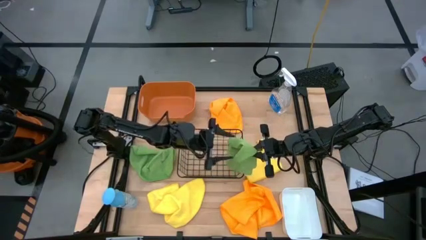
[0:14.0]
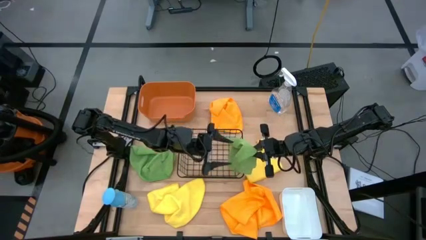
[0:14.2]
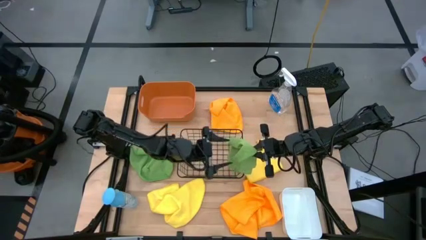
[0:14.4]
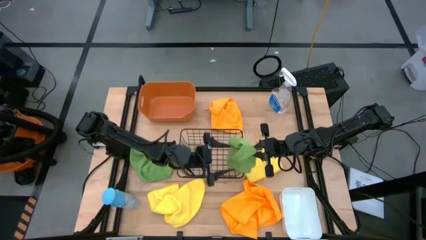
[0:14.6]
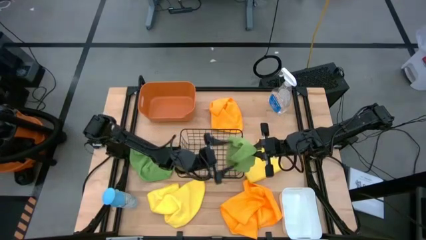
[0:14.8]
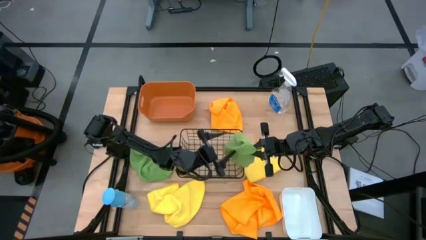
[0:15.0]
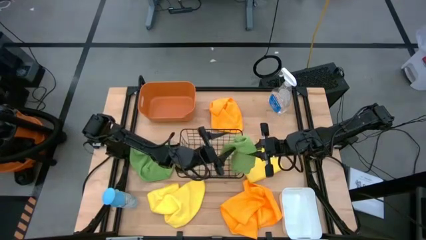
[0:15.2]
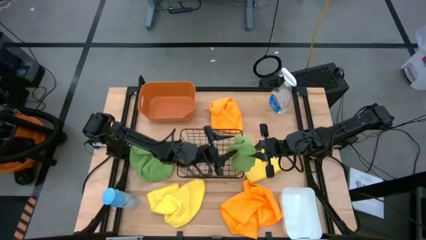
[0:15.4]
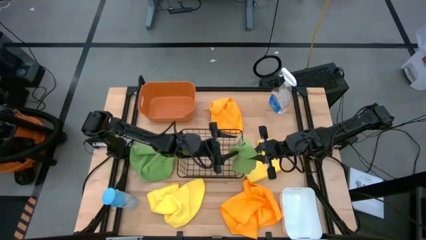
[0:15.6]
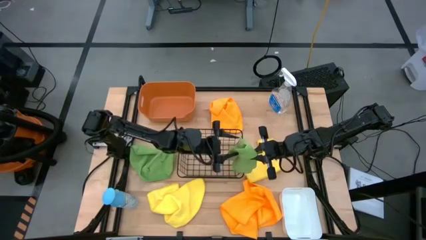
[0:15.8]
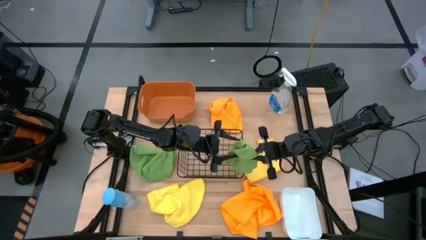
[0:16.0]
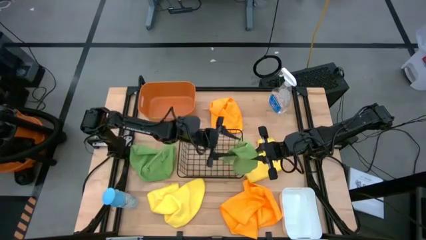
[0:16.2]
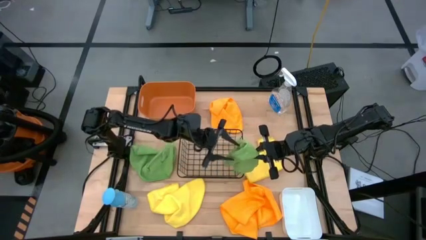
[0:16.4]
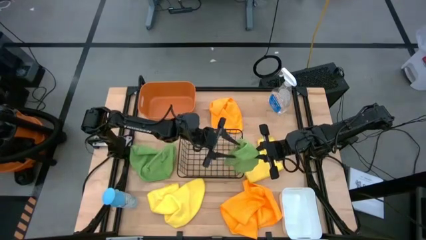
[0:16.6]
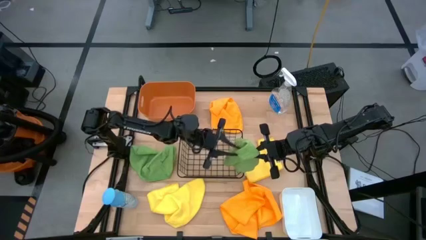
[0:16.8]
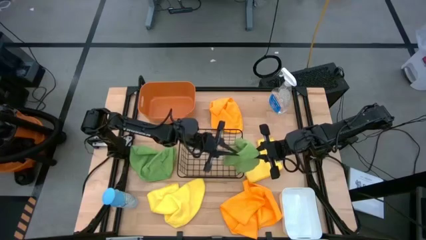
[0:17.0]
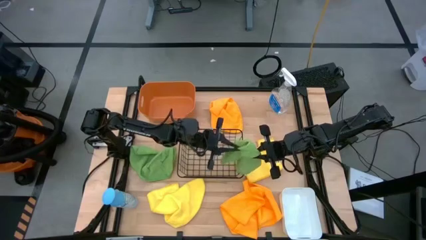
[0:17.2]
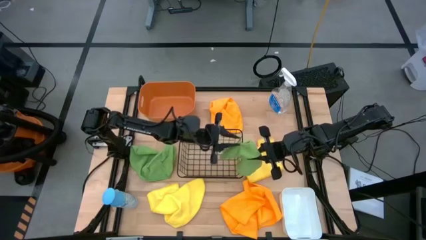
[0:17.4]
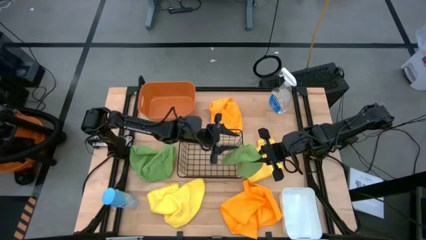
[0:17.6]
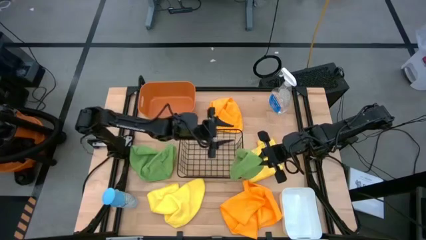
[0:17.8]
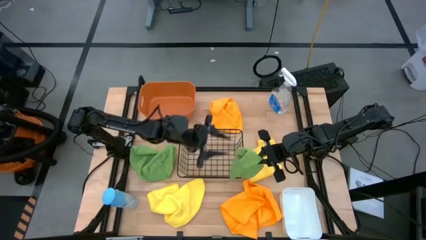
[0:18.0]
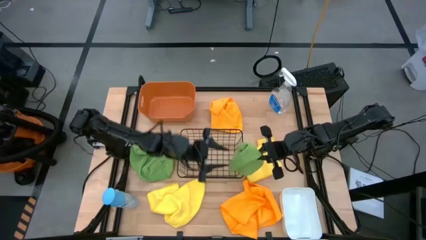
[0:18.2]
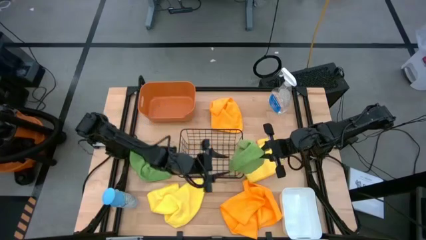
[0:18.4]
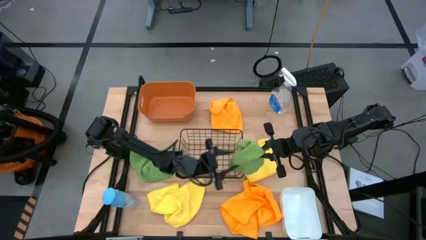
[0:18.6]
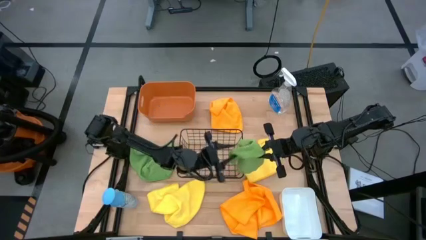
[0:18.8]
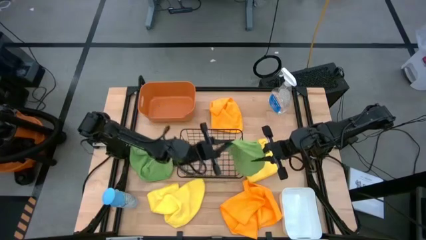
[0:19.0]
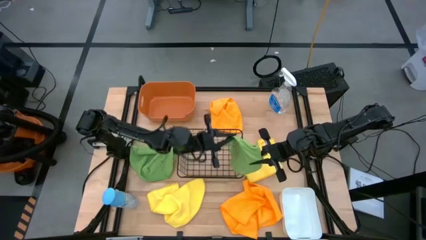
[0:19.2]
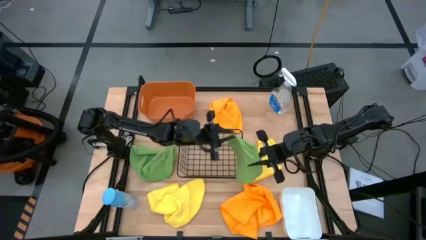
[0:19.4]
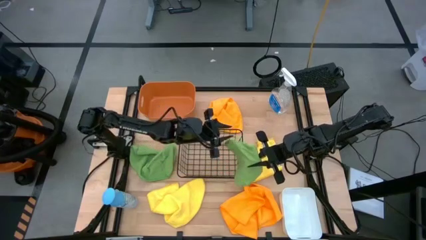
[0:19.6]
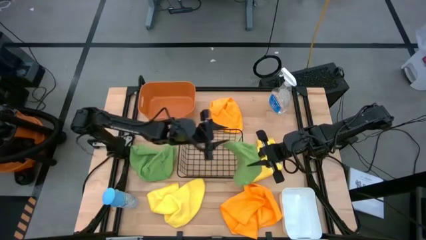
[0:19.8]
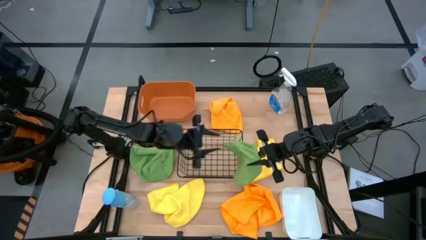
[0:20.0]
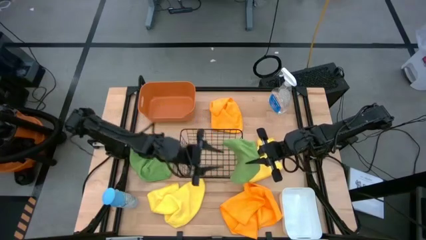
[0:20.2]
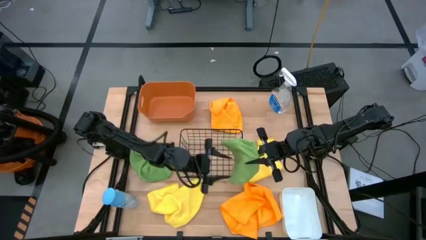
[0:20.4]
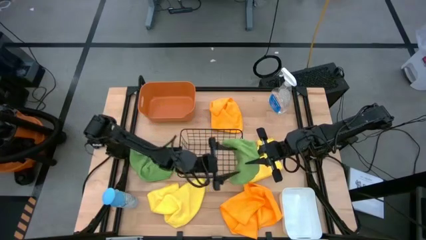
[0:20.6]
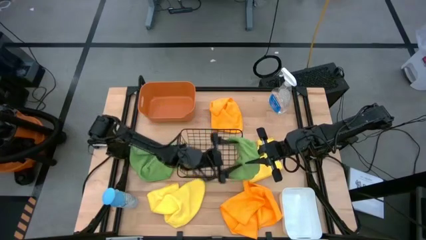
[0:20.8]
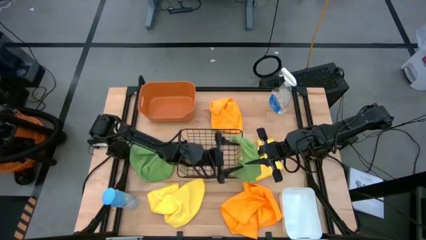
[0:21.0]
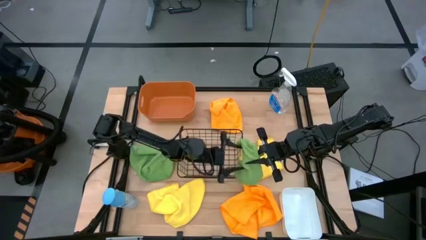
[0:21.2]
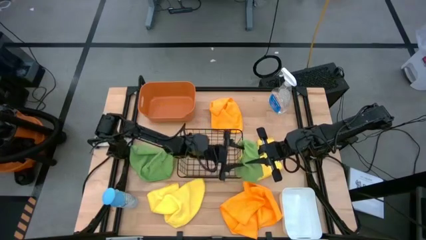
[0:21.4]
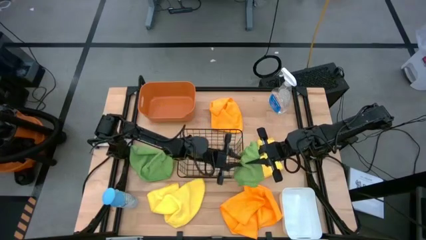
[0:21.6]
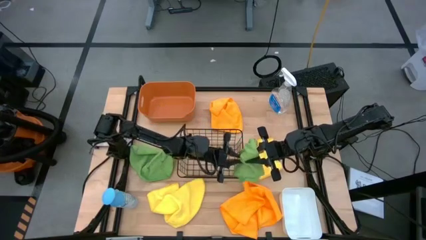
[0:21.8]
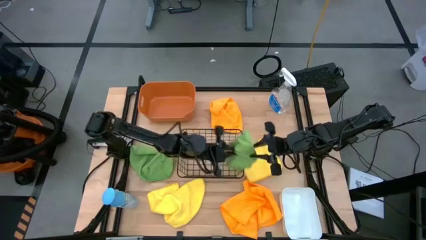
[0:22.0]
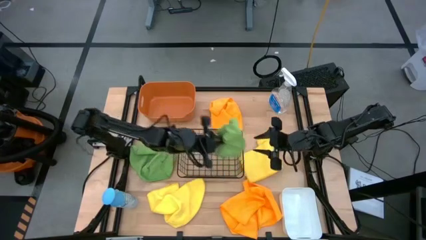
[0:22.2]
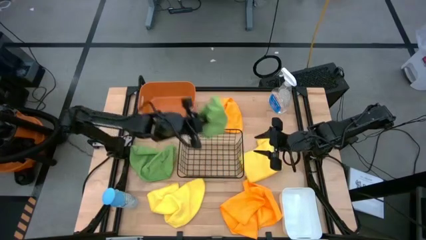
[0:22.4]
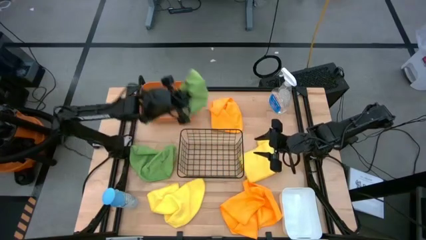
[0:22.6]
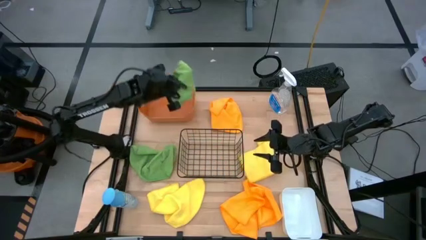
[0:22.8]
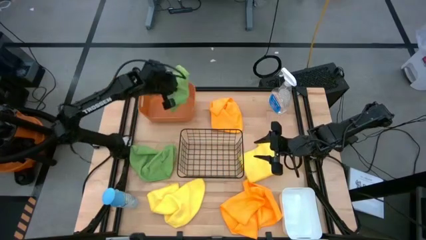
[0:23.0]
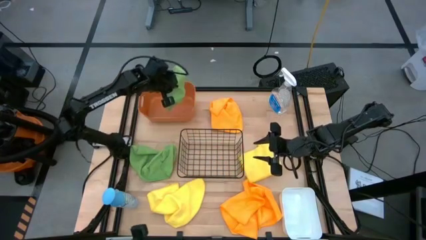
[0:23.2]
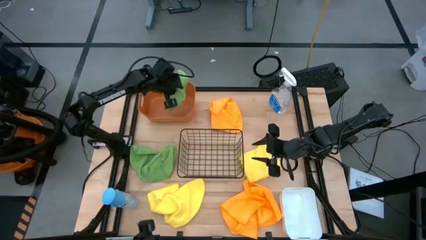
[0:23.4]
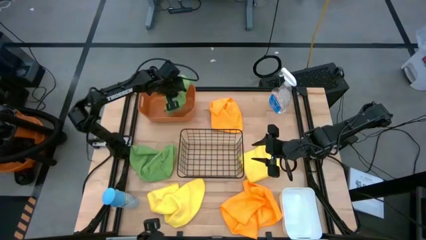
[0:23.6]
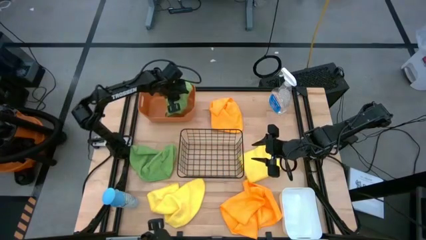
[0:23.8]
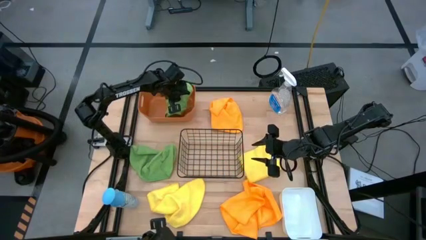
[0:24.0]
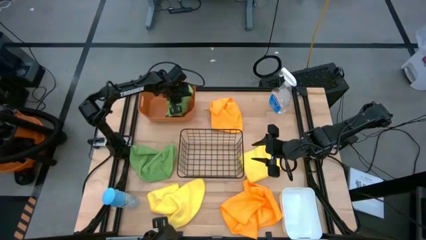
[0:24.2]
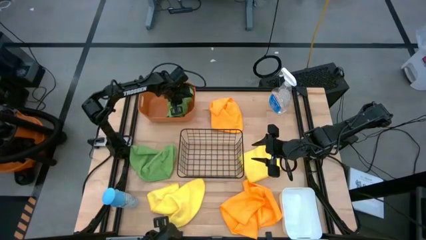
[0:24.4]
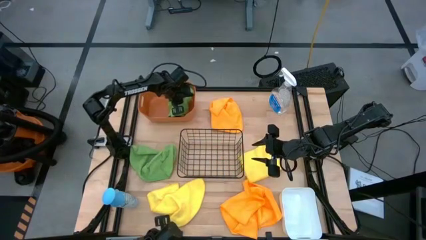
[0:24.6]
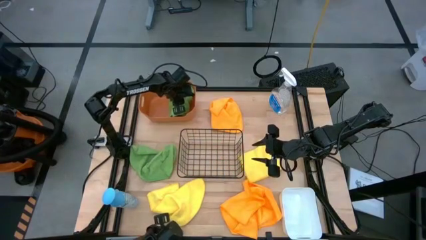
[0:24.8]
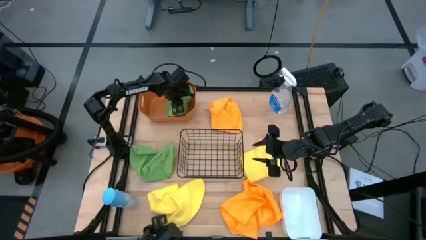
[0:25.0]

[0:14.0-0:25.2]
Task: Sort microfiber towel by color & place in baskets
Put the right green microfiber cloth into the orange bin

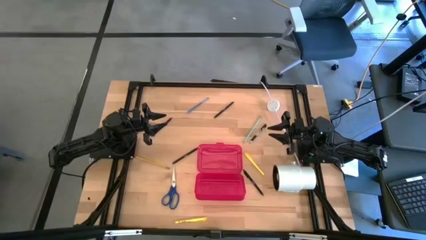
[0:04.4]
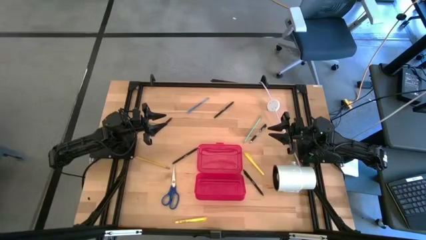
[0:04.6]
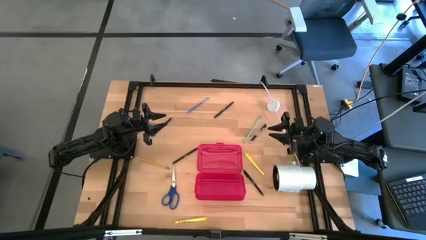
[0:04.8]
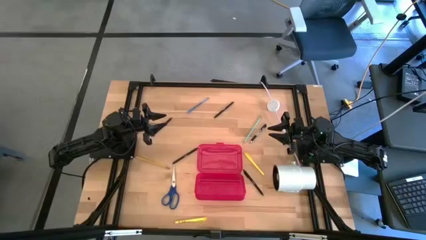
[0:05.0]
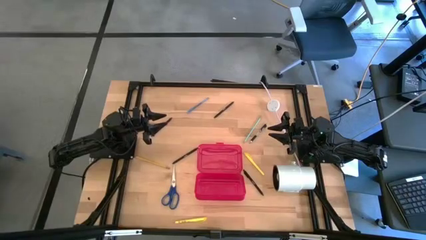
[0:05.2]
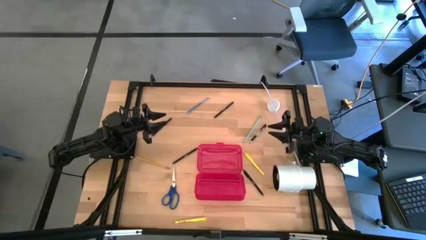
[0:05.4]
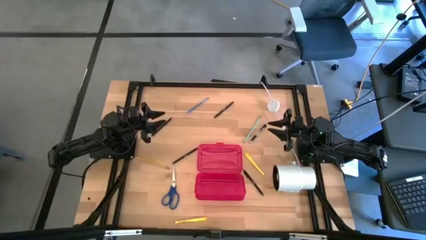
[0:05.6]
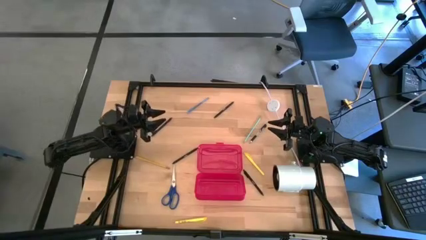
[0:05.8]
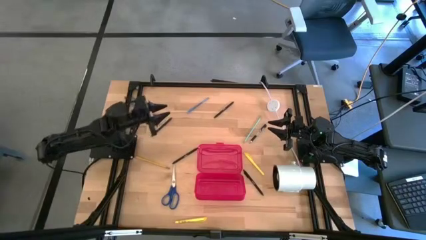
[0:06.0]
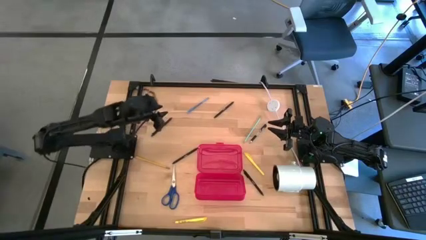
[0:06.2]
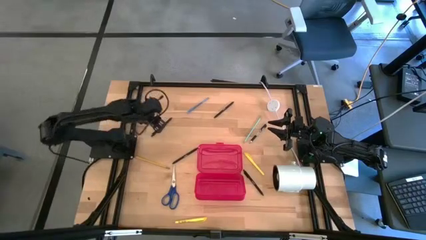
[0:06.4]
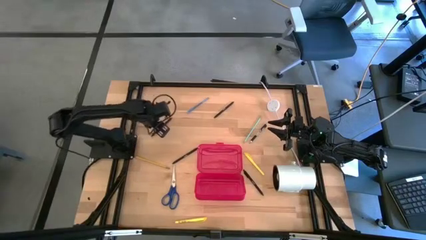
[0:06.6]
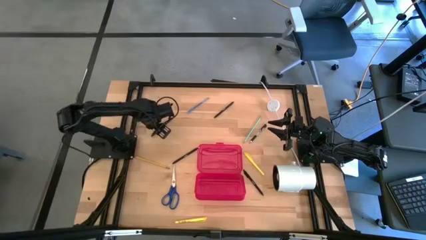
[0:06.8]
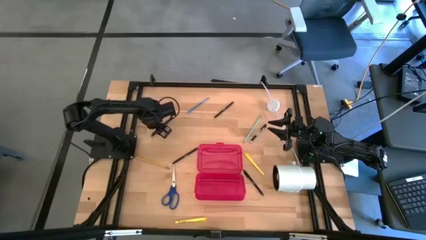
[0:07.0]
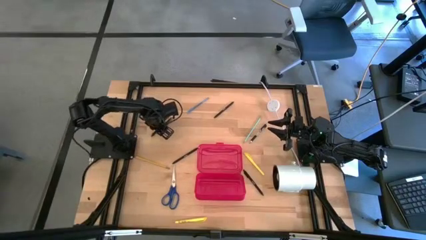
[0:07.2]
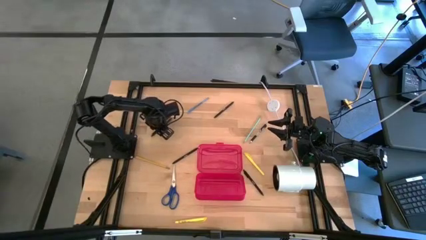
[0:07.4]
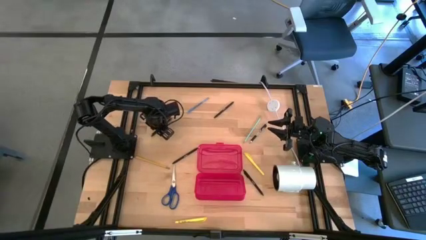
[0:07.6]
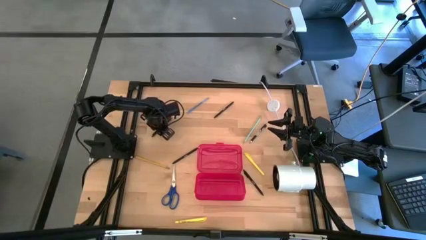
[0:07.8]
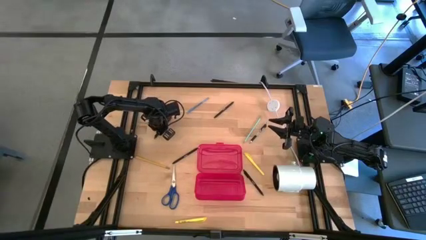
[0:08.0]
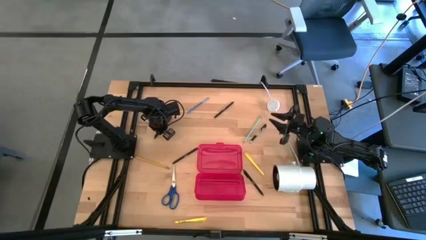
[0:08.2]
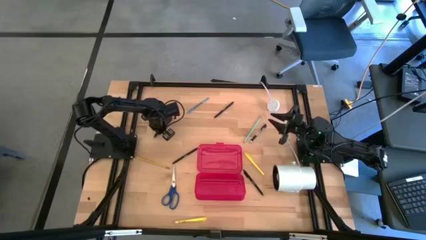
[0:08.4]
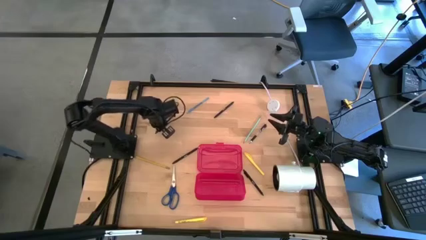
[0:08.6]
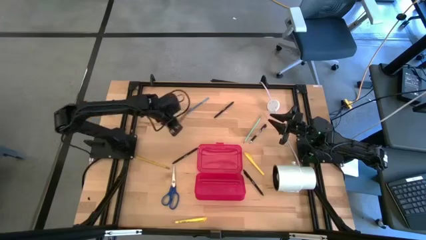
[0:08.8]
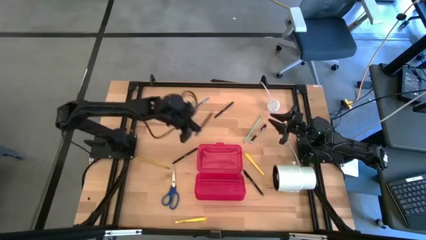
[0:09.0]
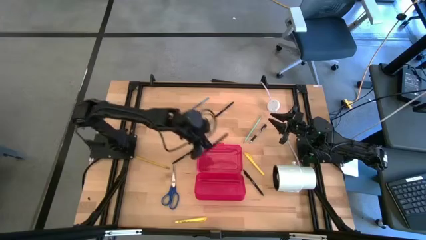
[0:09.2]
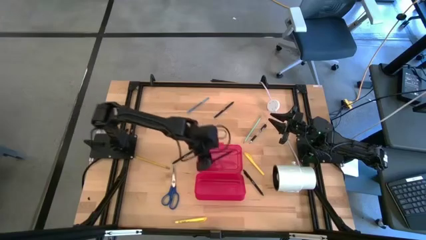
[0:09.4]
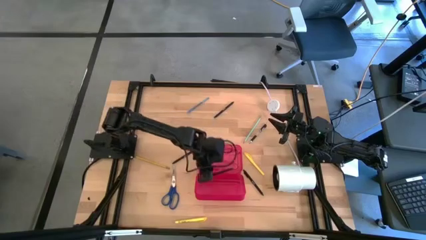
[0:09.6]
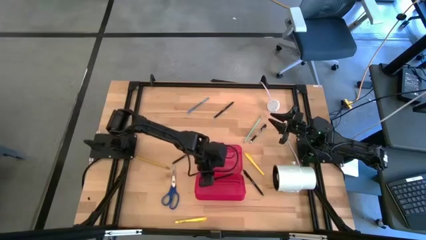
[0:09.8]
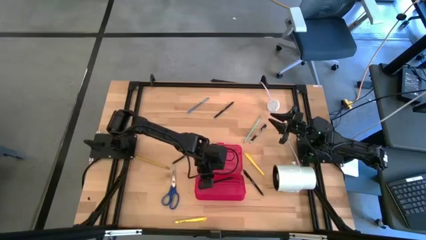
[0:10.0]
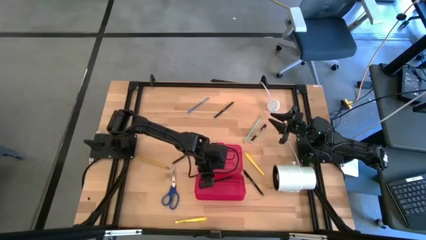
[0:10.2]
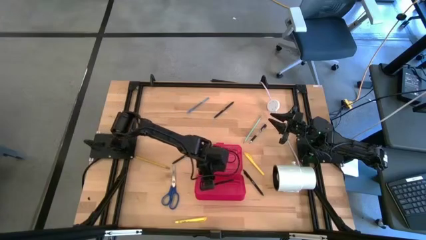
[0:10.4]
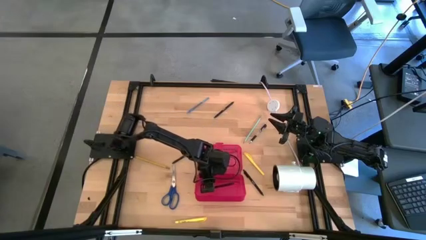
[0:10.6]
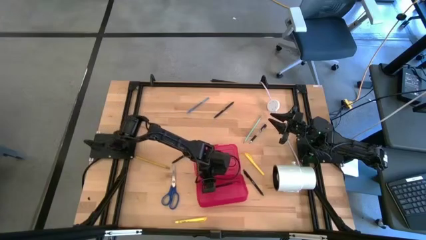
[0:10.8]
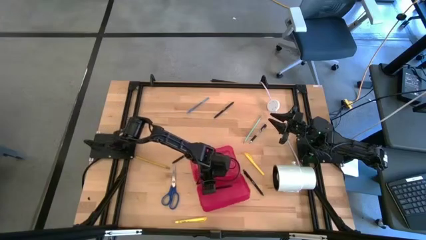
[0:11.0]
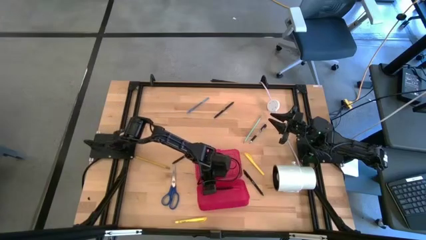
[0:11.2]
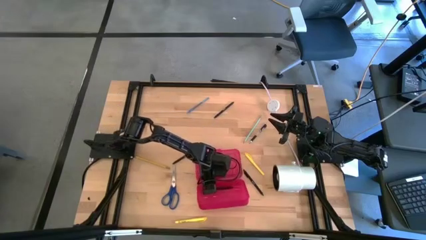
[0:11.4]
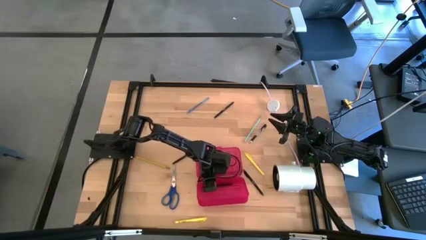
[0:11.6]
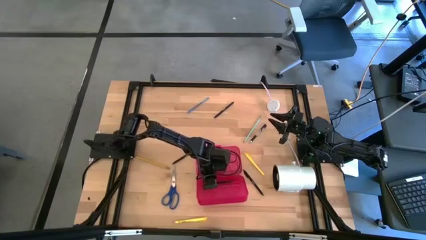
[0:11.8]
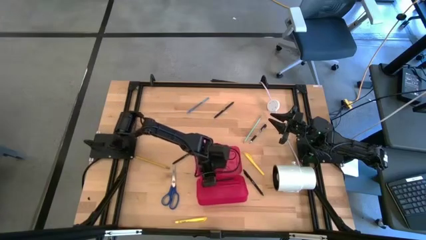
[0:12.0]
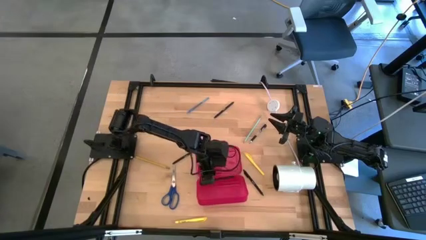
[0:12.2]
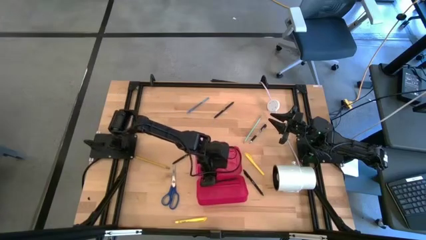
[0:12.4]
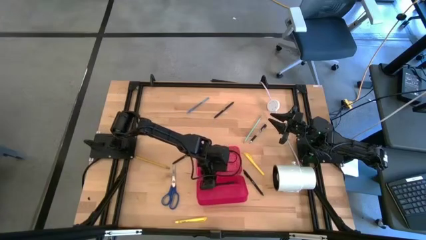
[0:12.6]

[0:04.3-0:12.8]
Task: Pick & place school supplies into a supply box
Put the top left black pen into the red supply box
